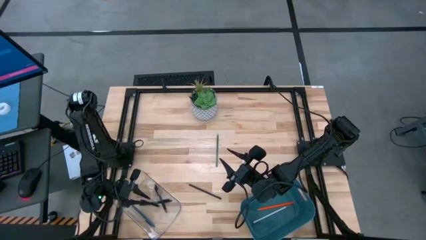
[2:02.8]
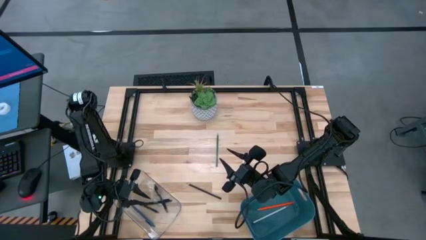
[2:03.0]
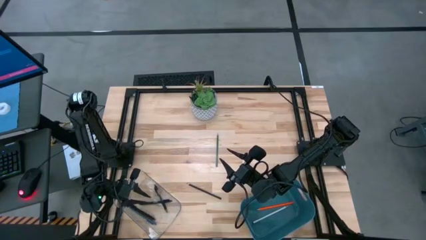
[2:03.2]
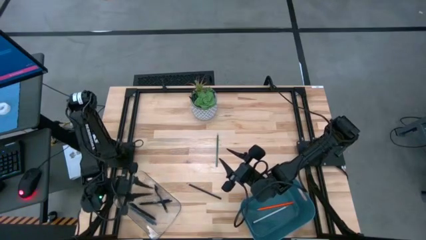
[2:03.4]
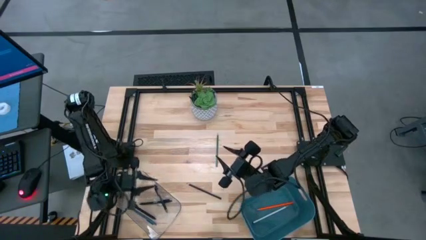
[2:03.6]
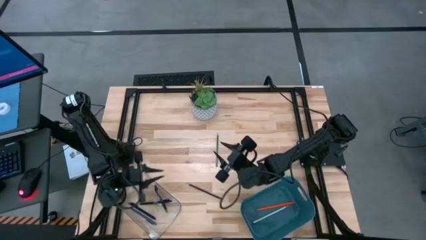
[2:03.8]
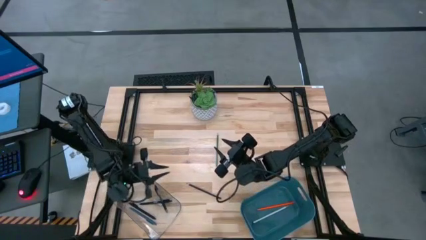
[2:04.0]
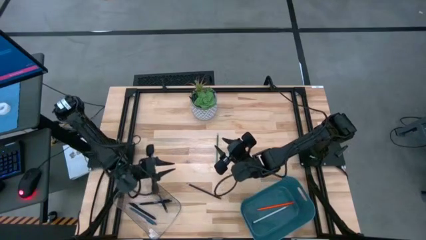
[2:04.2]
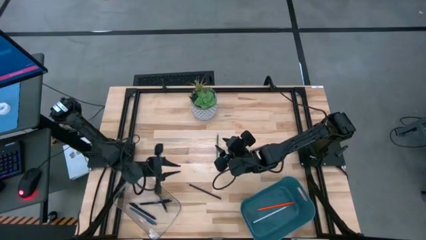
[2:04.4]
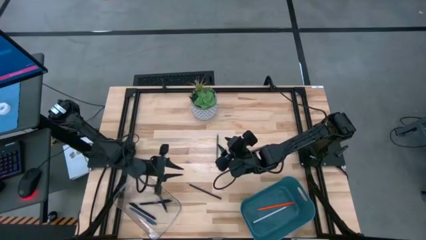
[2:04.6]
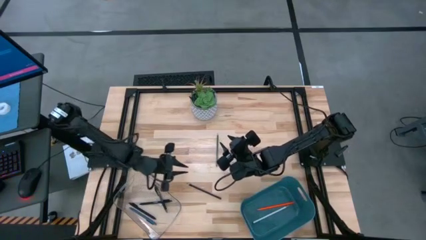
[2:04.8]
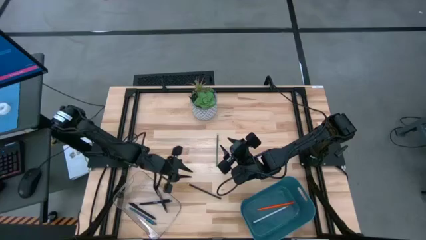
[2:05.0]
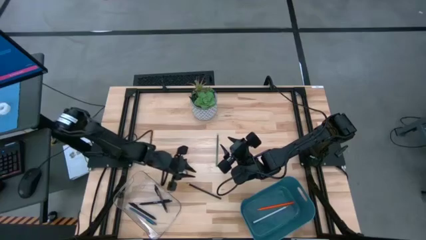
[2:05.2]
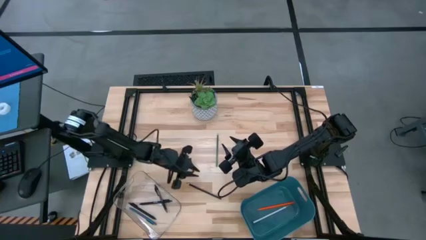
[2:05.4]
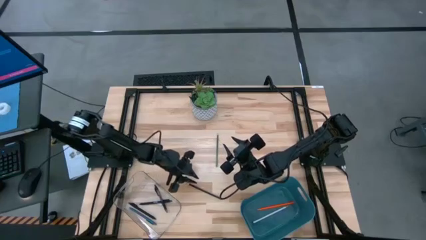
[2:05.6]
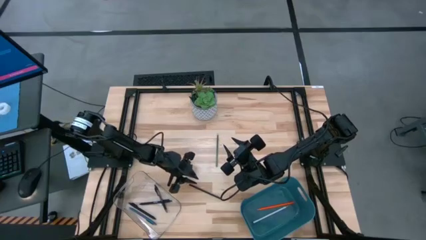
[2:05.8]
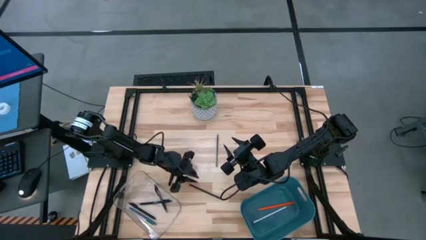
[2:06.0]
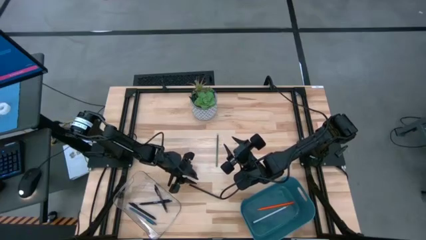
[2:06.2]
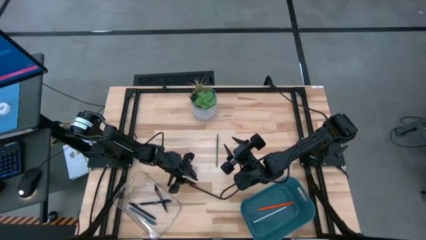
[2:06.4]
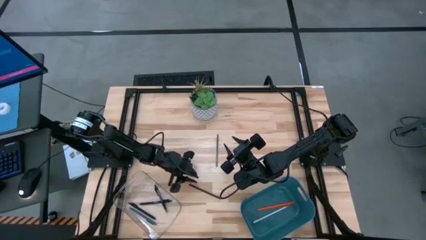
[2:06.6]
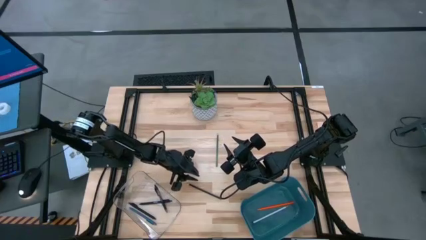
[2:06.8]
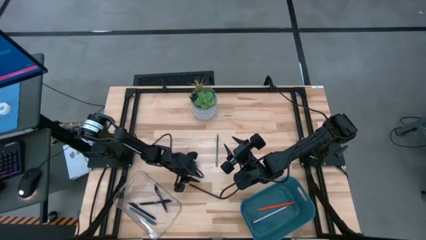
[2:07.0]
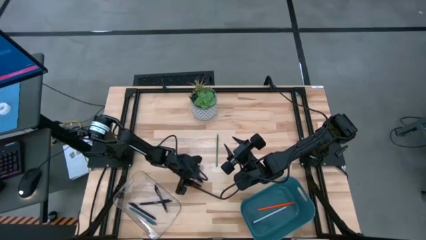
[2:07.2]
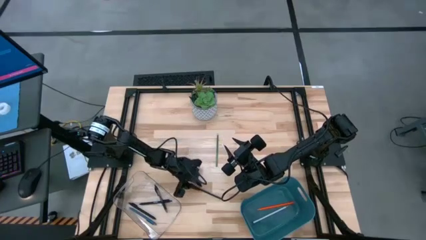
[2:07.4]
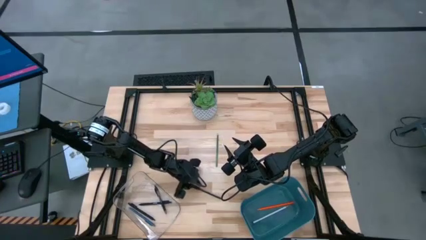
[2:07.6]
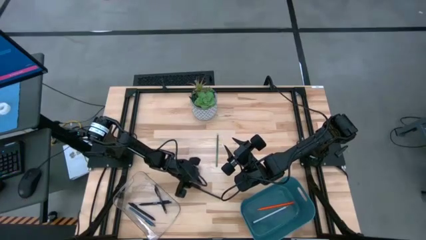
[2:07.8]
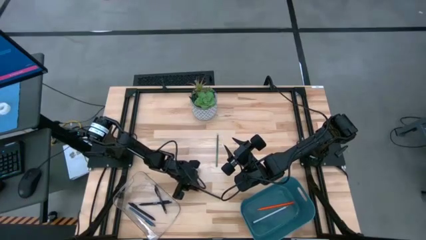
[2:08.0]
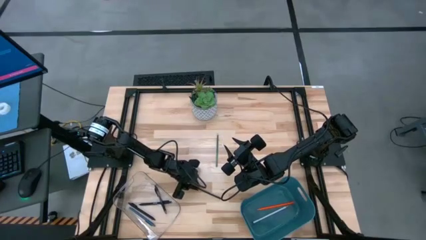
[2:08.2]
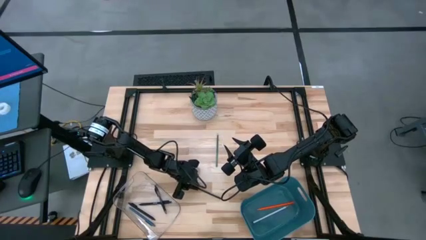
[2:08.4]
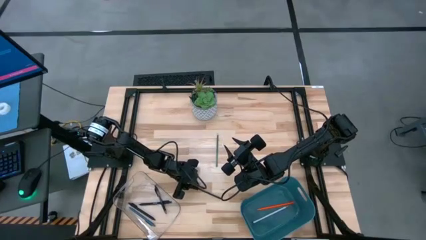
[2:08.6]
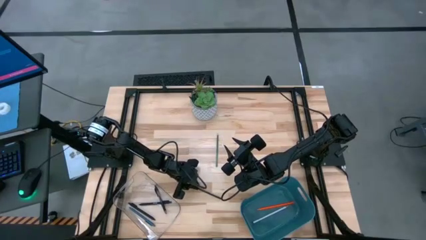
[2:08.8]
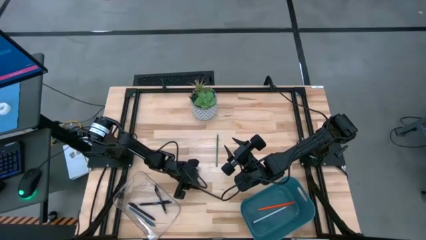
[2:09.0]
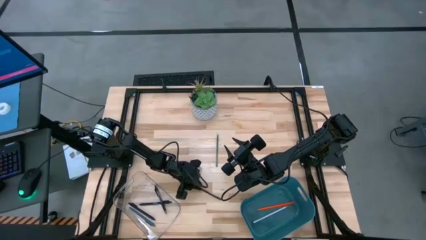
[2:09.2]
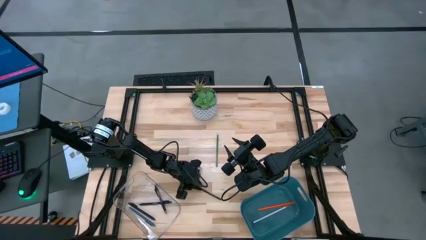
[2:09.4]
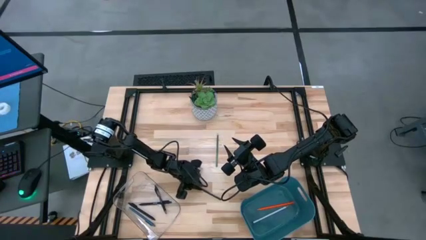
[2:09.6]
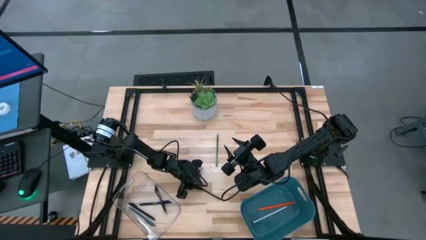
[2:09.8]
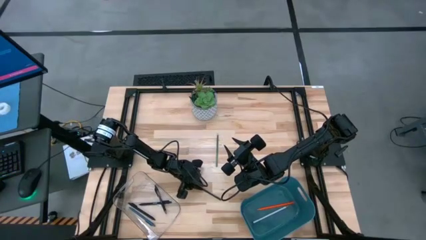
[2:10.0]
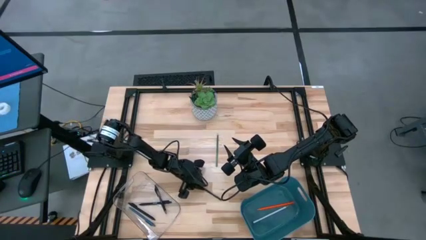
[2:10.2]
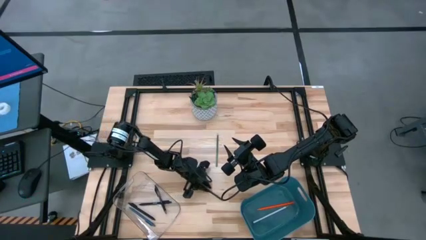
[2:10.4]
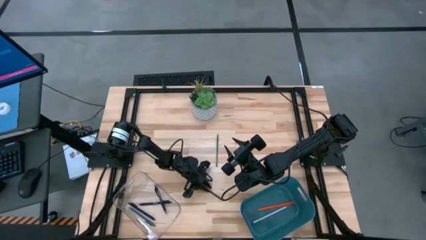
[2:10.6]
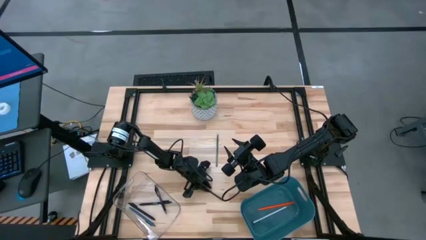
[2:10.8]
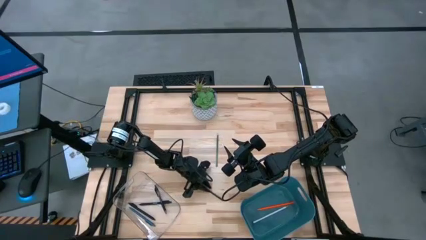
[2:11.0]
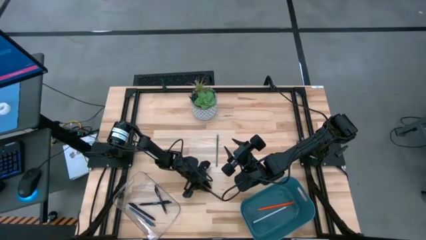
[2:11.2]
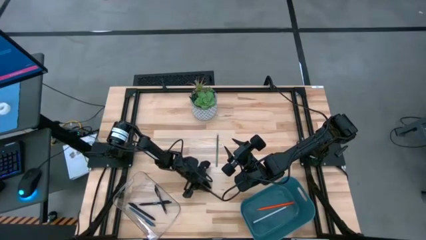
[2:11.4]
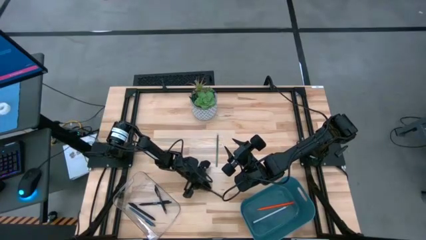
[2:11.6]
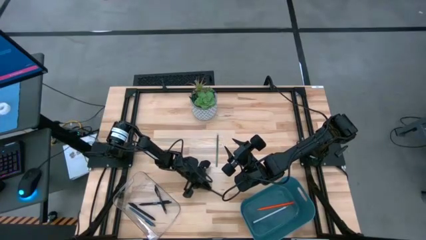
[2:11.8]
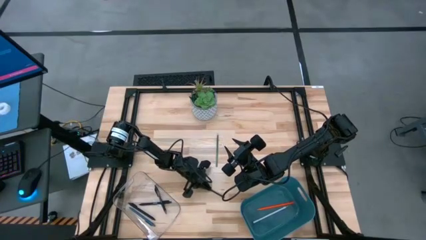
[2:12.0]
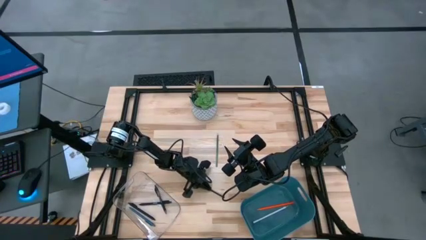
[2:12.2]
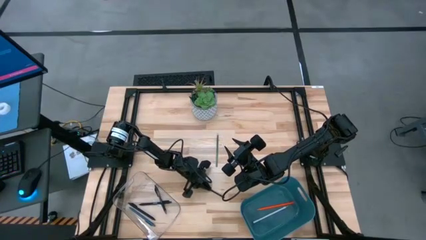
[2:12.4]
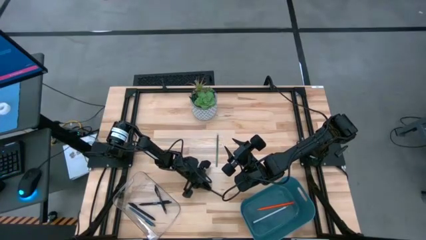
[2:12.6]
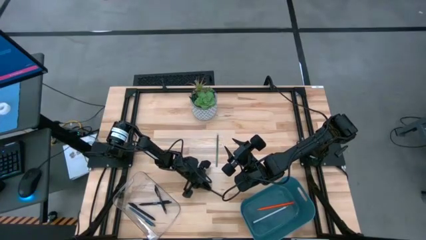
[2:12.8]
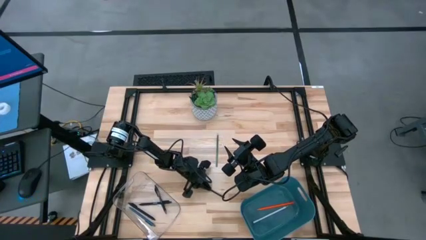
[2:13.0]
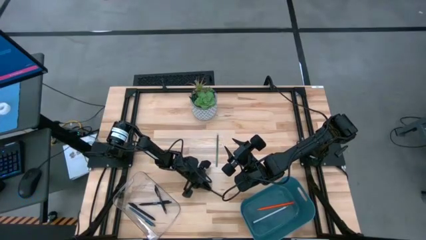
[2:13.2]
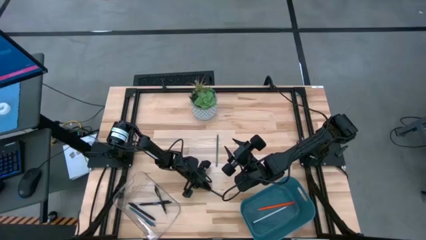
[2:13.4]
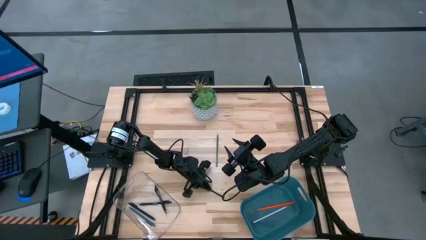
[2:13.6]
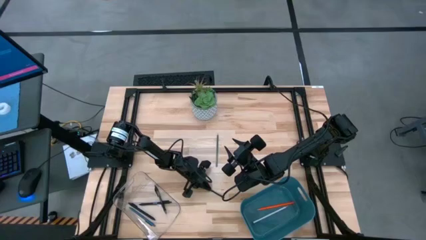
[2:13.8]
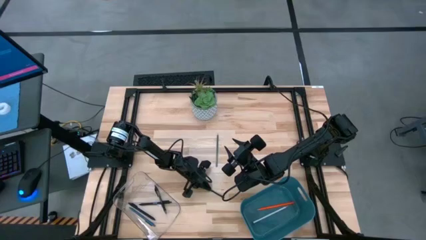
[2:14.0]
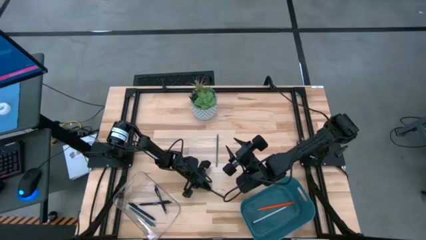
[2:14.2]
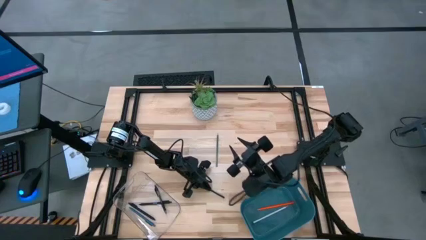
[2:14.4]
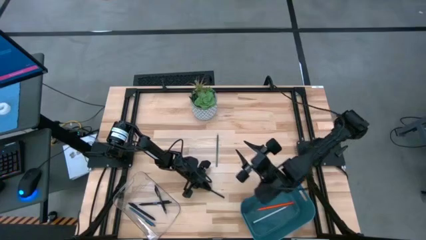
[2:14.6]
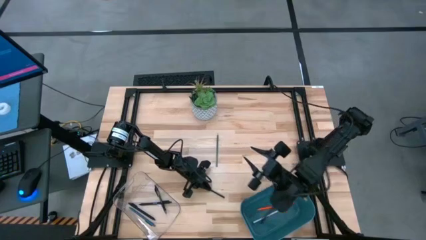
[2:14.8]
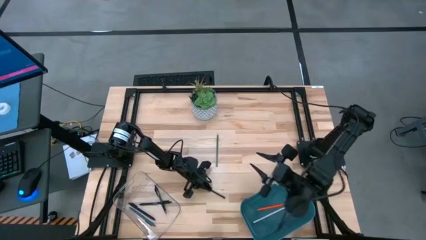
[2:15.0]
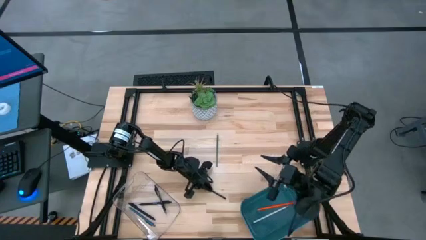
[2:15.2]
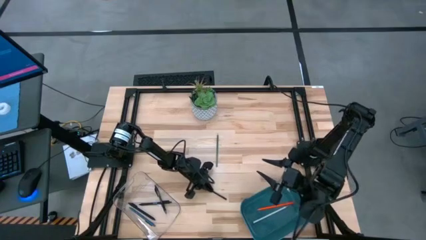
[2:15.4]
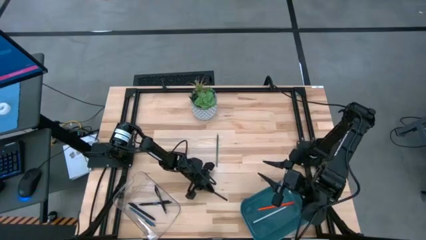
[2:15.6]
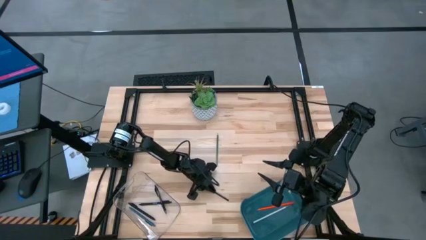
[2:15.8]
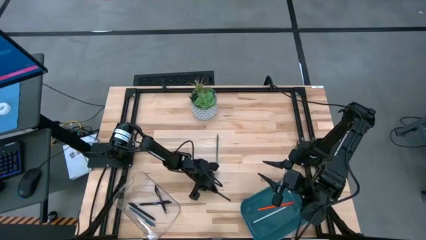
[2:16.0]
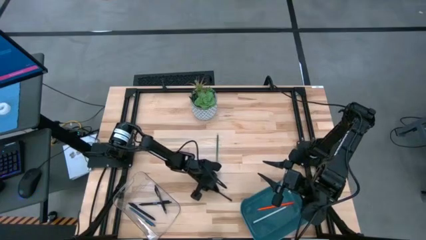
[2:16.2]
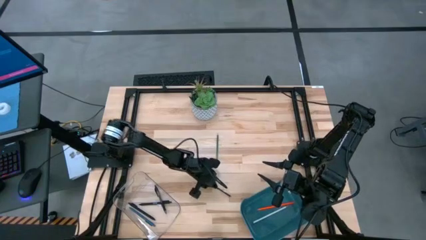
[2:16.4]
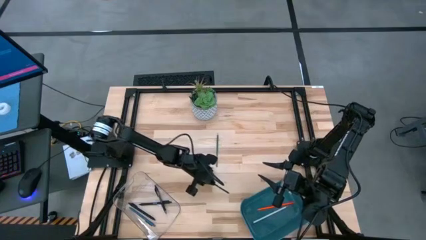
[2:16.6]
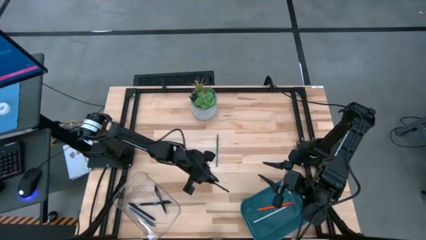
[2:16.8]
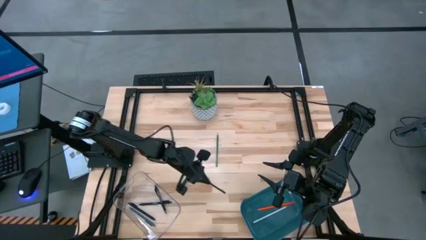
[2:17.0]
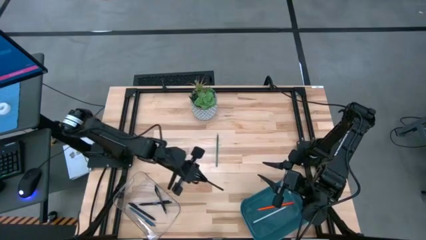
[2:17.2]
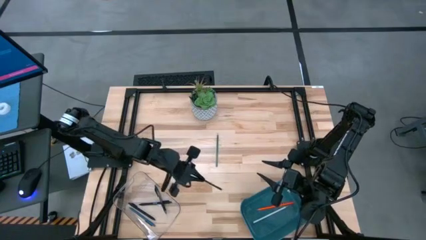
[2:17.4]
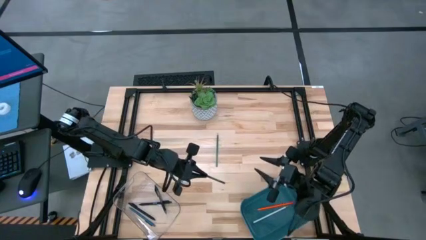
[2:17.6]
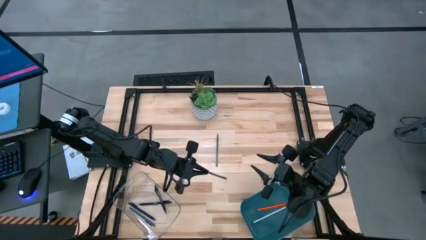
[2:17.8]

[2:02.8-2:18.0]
Task: Sort pens & pencils
Put the black pencil into the blue bin

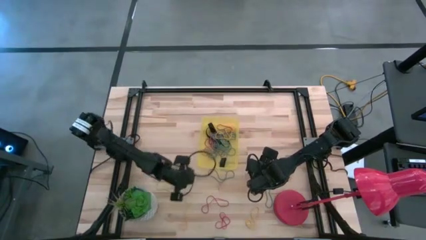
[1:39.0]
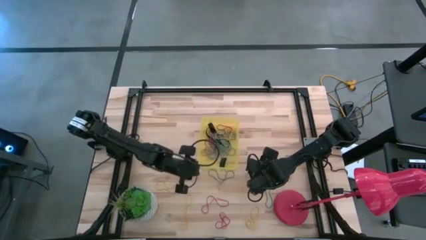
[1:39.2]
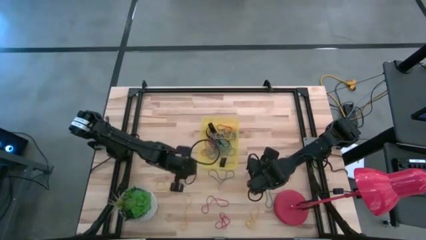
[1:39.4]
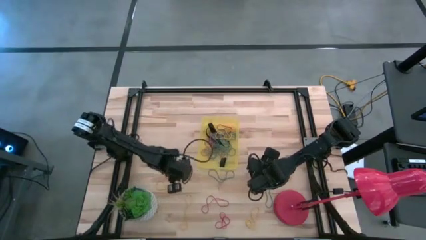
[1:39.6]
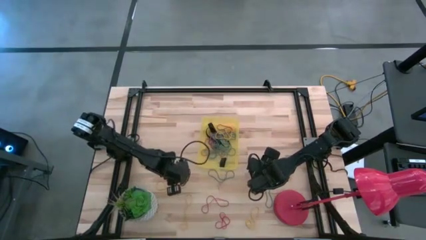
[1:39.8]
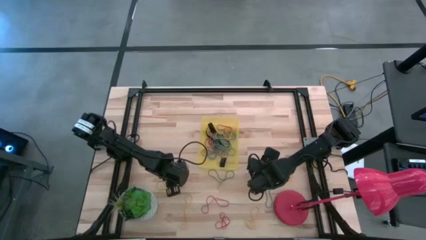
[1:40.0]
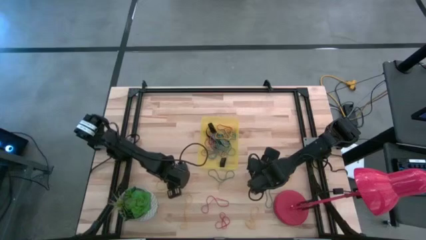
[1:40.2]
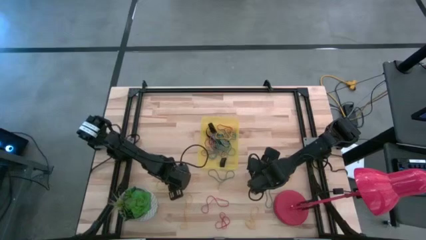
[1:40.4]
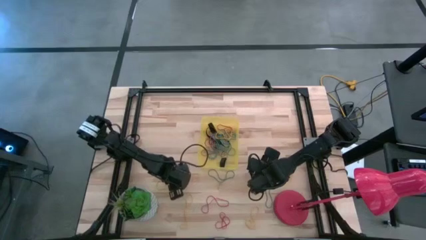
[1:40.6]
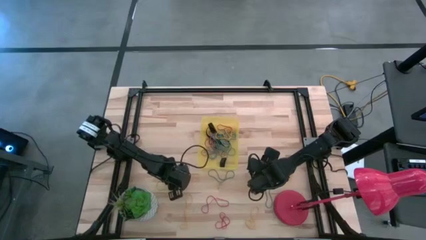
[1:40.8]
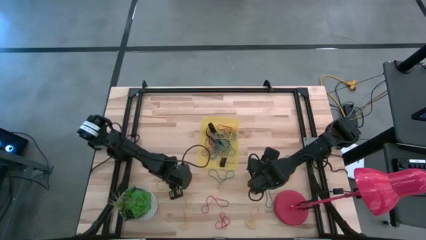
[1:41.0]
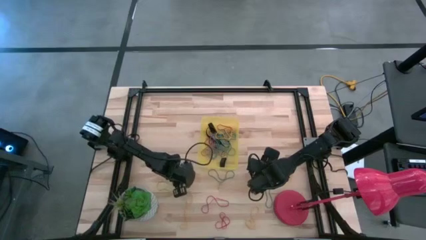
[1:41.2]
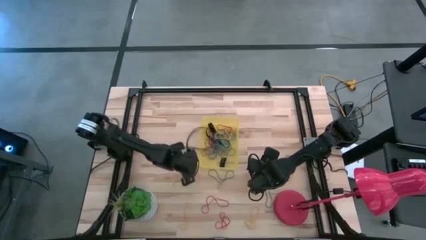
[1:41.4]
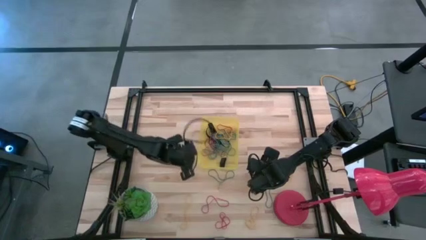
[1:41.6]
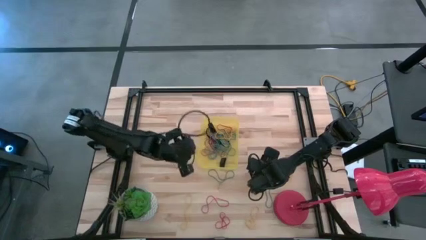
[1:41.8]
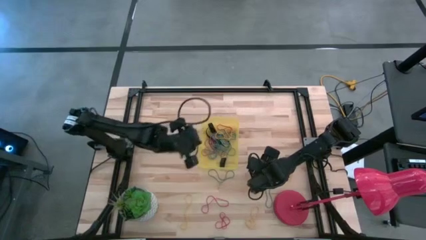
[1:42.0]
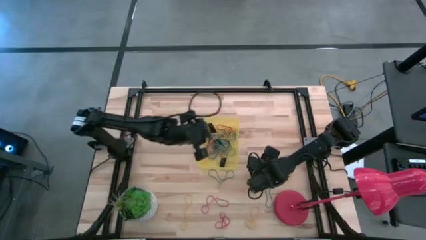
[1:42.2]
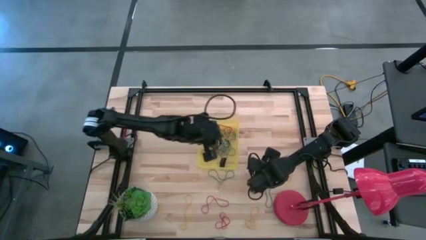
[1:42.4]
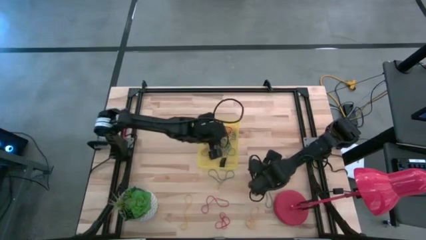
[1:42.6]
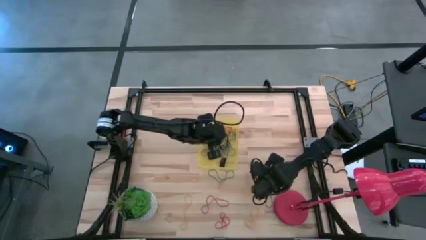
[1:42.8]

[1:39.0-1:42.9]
Task: Pick and place rubber bands into bin
Put the yellow rubber band into the yellow bin
